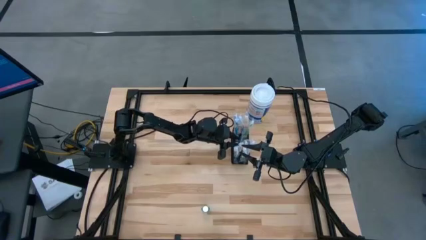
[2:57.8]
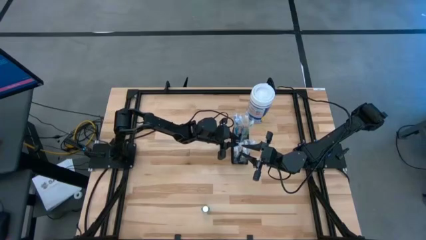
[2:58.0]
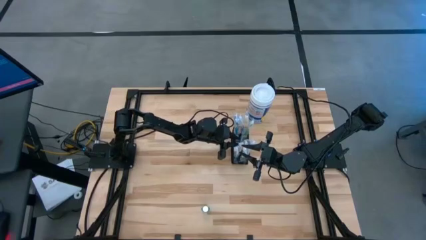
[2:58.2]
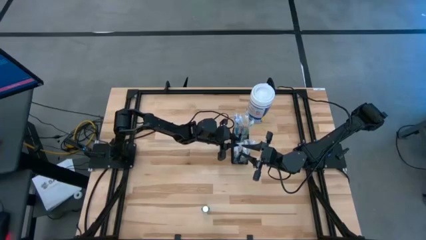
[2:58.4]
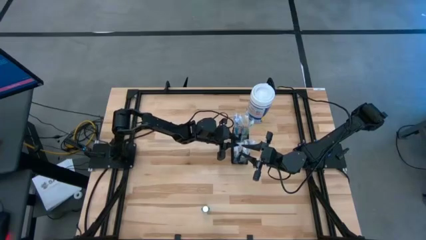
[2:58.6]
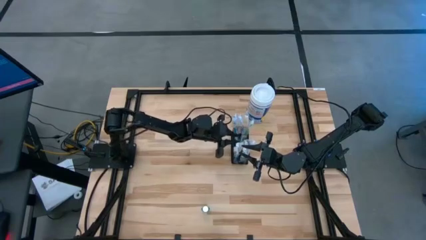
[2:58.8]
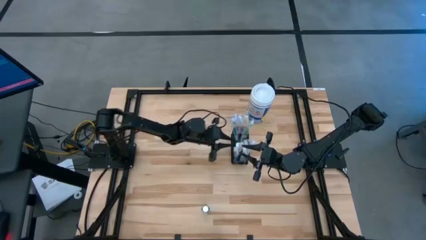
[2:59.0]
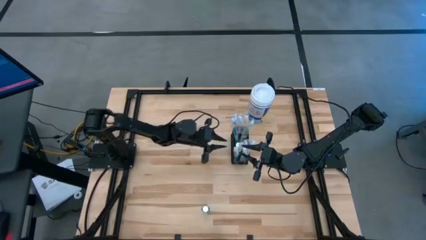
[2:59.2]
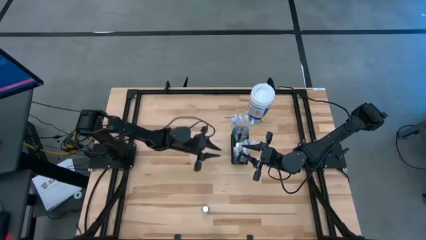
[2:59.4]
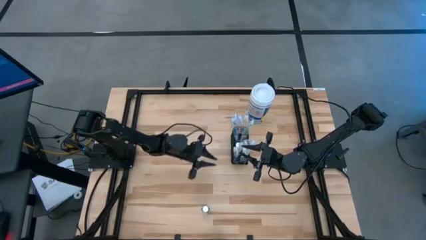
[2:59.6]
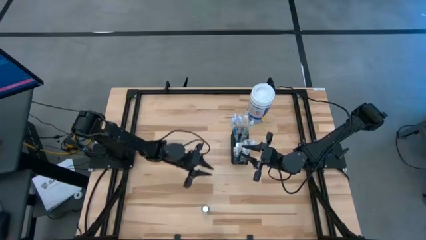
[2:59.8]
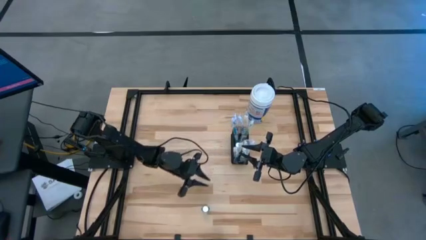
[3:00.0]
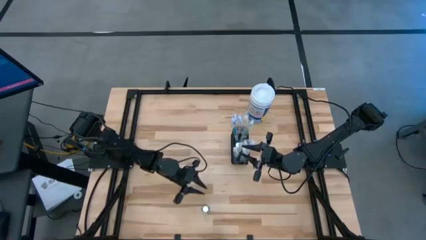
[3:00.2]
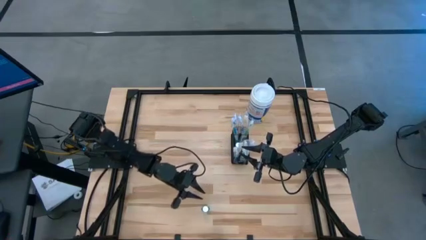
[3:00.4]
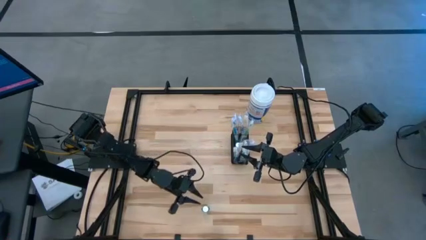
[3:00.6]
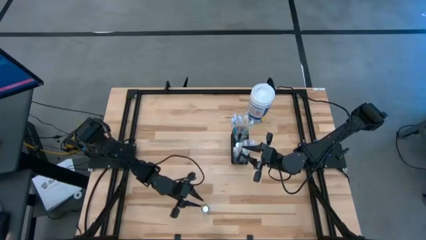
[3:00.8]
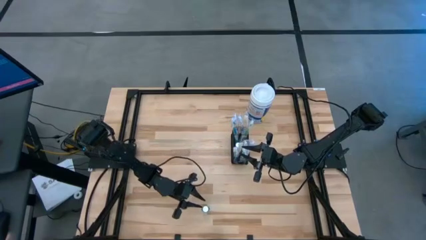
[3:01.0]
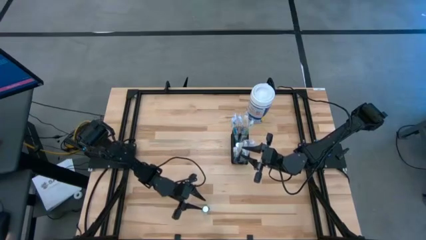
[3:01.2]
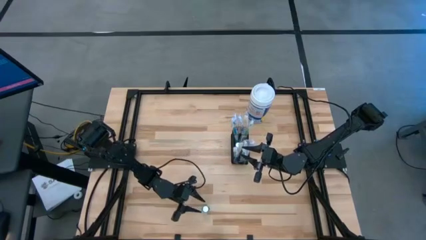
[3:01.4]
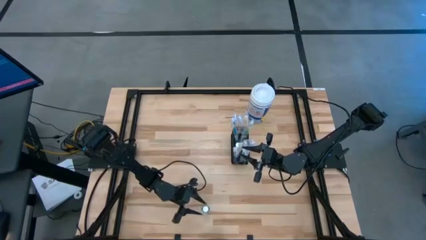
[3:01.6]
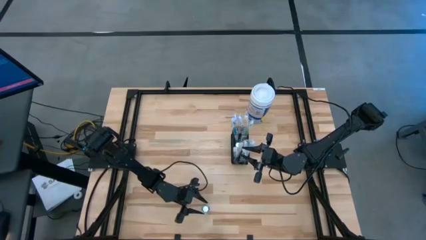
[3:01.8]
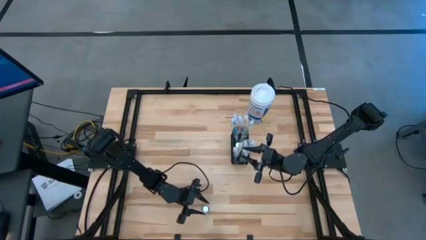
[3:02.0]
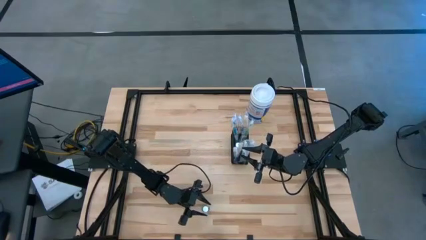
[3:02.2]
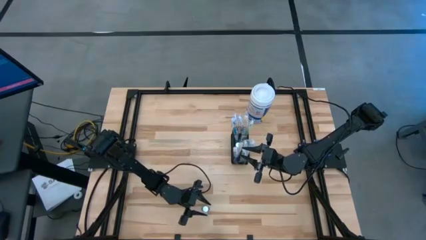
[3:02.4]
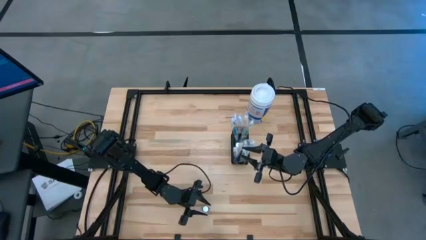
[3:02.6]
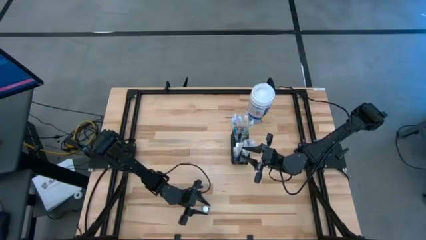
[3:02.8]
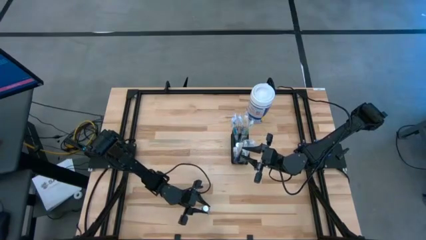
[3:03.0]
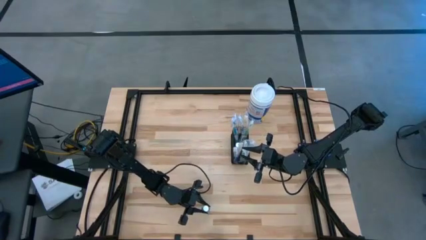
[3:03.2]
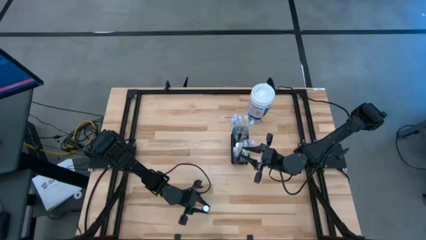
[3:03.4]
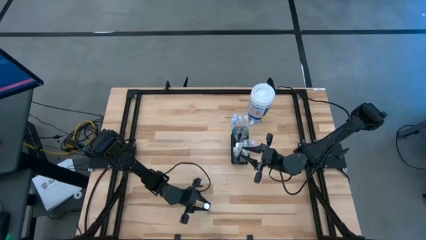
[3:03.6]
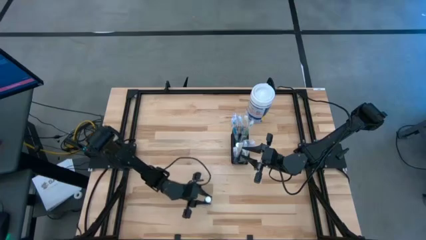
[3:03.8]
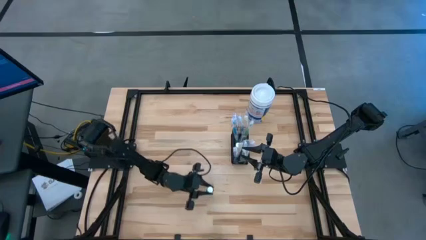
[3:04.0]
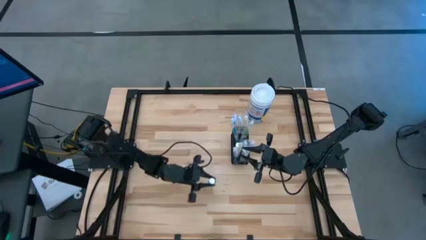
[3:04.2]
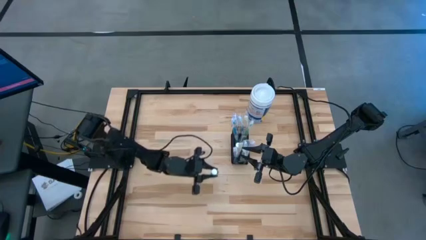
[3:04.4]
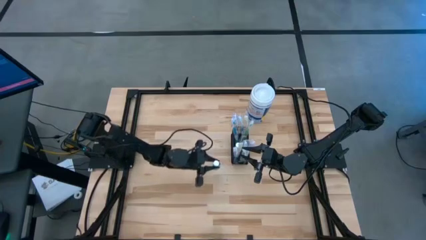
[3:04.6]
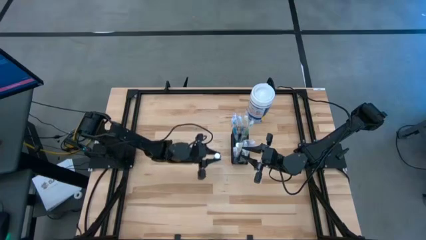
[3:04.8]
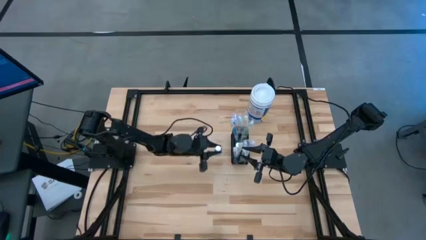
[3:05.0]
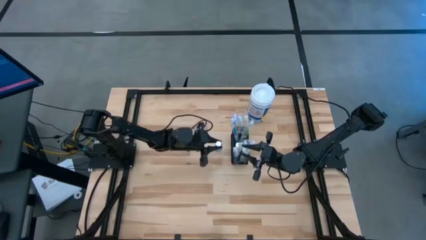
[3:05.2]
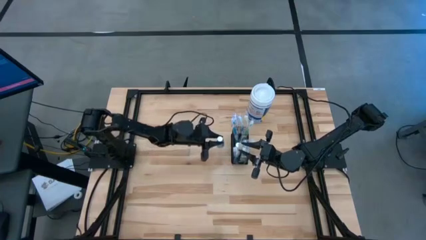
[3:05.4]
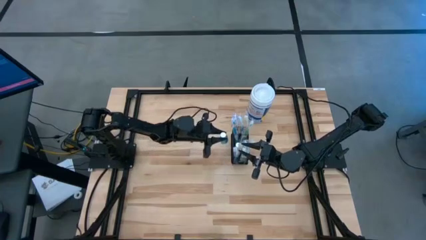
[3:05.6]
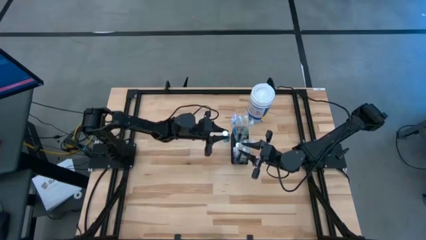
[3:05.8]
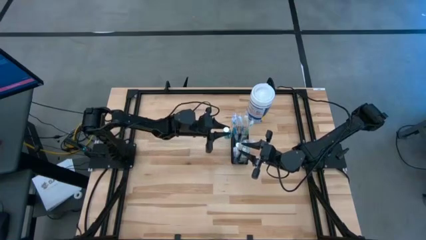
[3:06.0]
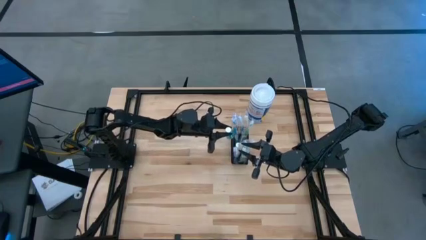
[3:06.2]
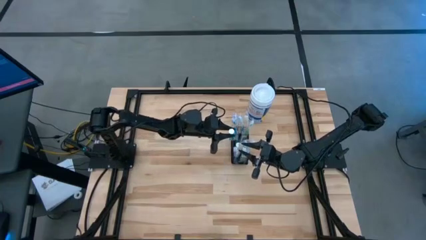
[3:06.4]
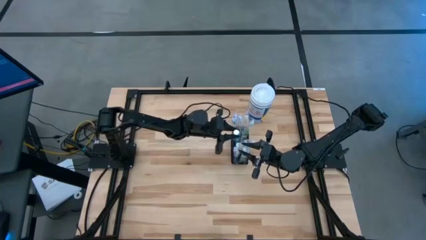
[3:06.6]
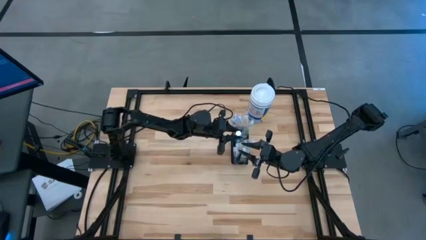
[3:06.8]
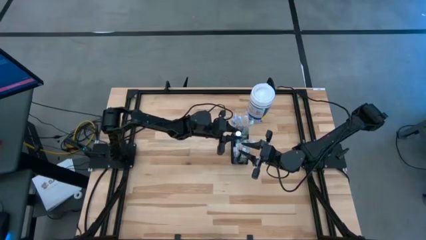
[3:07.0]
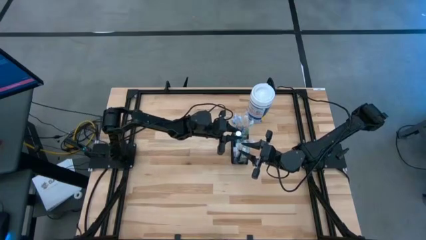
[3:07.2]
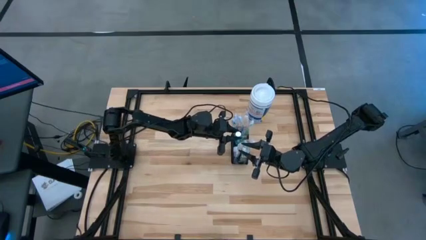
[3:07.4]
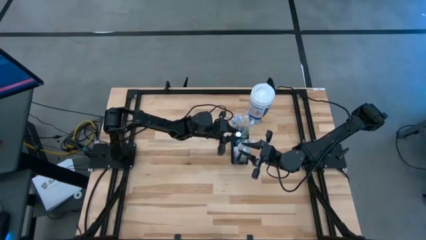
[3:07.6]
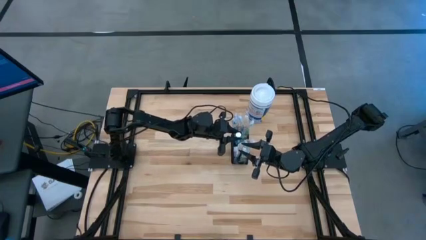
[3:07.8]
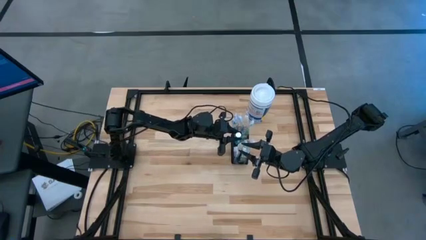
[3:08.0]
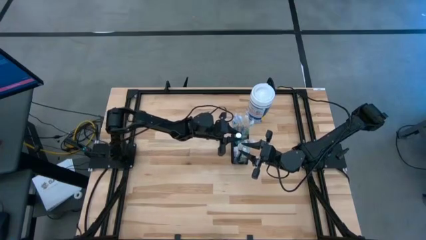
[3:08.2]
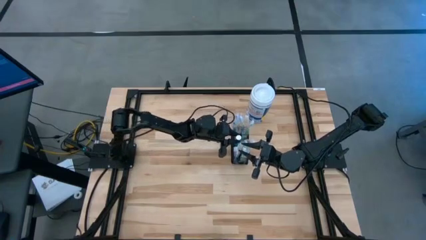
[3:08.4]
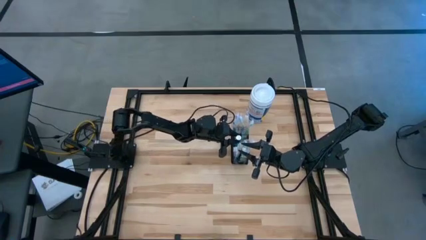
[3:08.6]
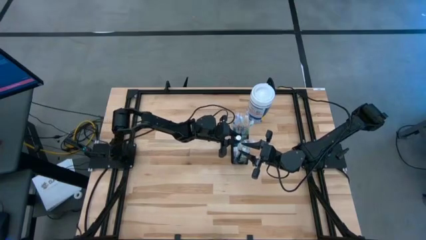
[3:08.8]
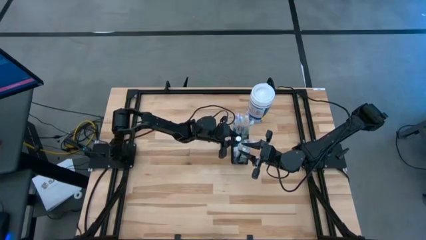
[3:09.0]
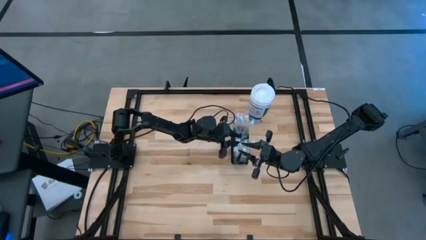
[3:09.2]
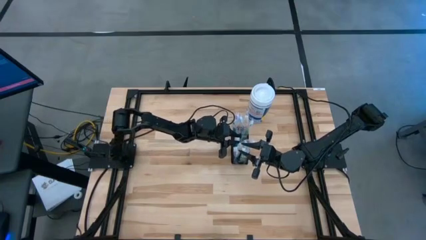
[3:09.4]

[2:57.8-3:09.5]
Task: Pick & Place toothbrushing station
Put the blue liquid mouthwash into the wire mesh organizer

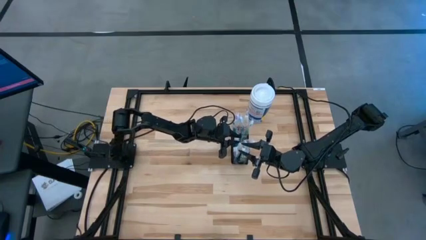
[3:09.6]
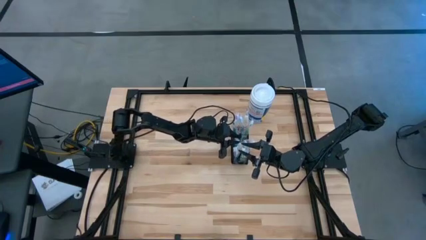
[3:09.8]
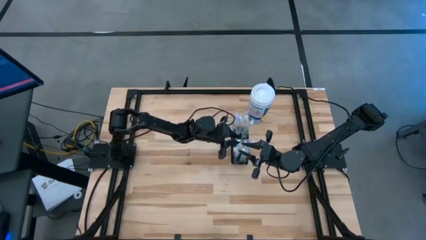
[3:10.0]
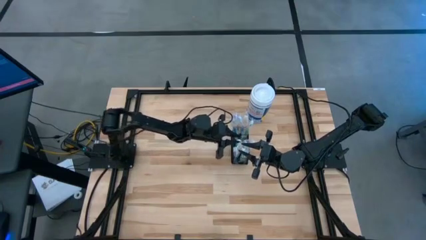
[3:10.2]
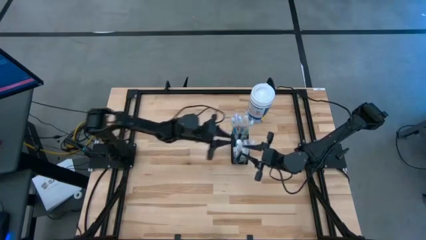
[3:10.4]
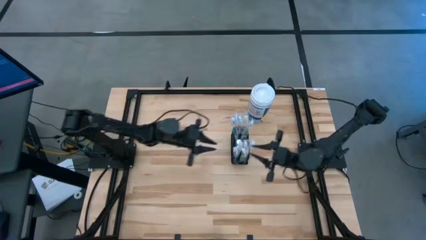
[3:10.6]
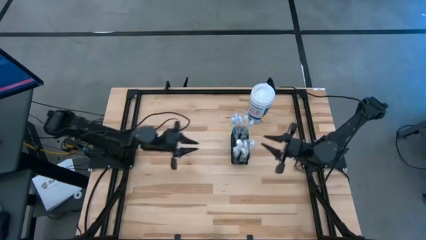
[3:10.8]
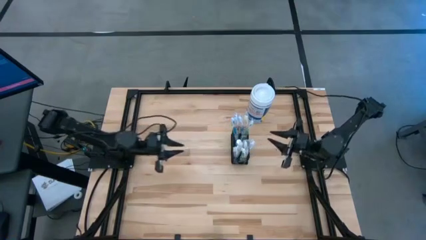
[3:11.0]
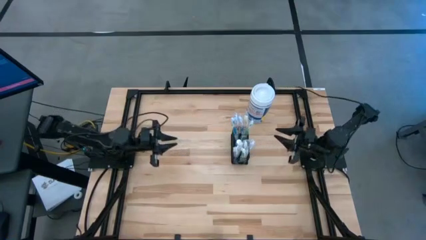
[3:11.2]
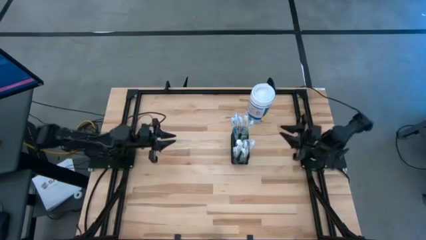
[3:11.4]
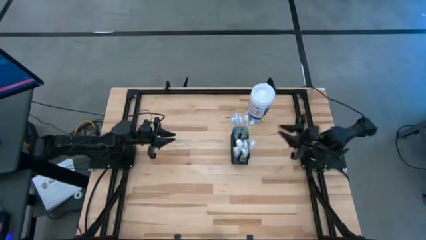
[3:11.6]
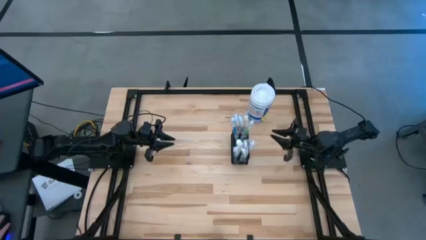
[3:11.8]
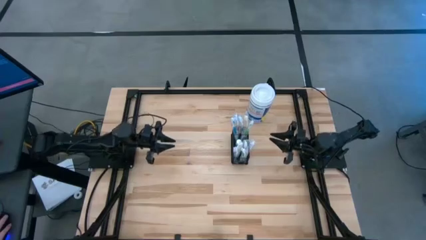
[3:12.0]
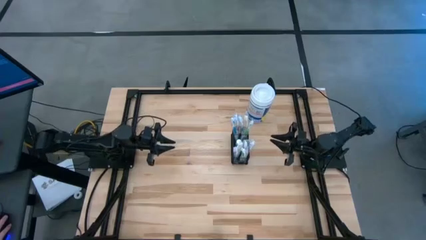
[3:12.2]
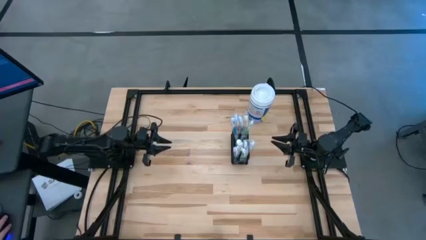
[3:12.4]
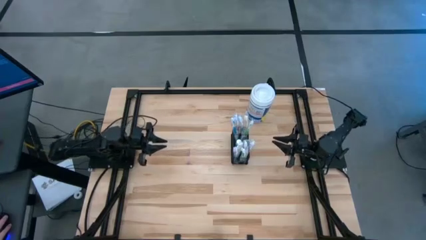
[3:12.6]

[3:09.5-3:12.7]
Return to Home Position
